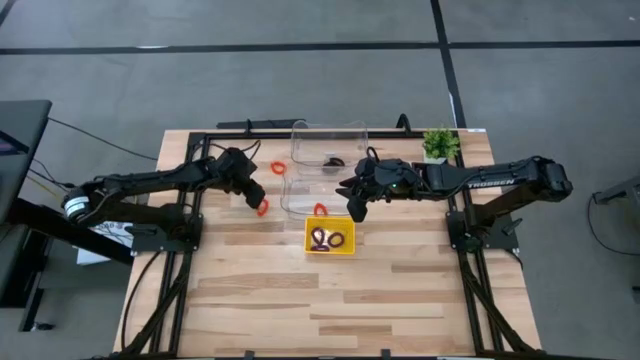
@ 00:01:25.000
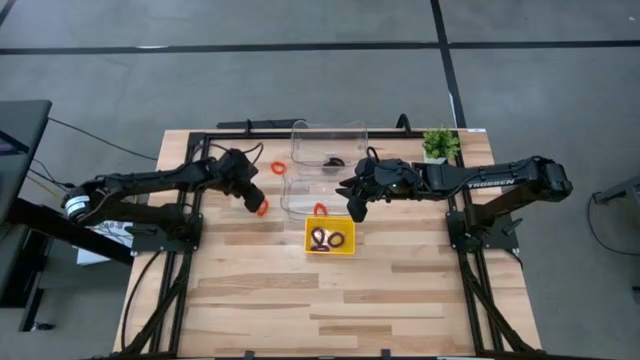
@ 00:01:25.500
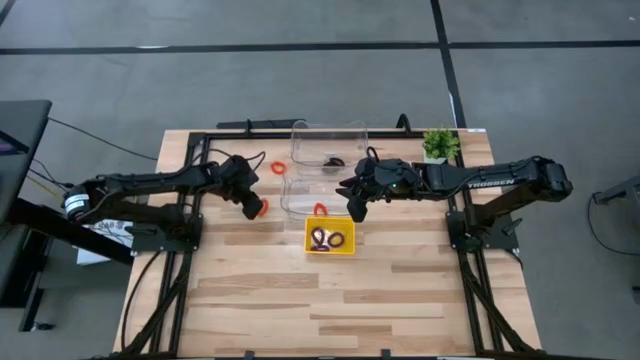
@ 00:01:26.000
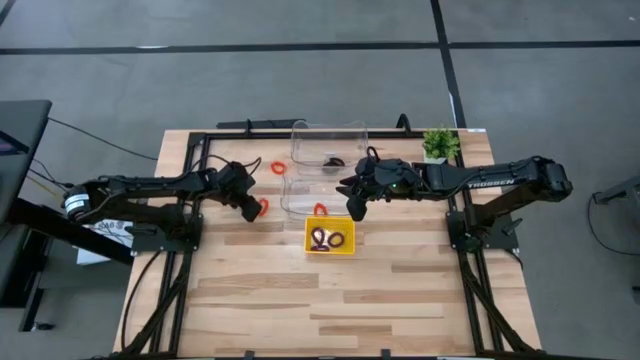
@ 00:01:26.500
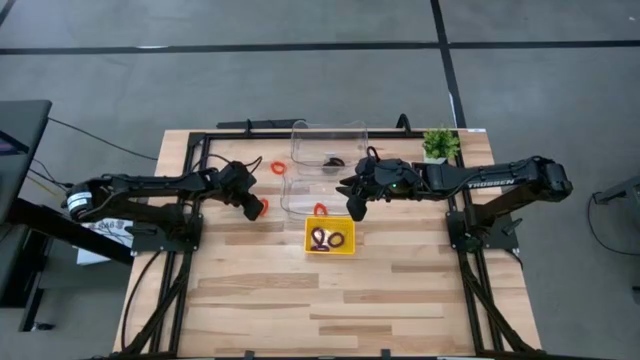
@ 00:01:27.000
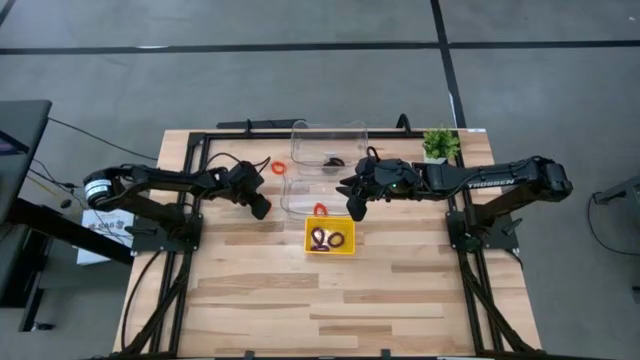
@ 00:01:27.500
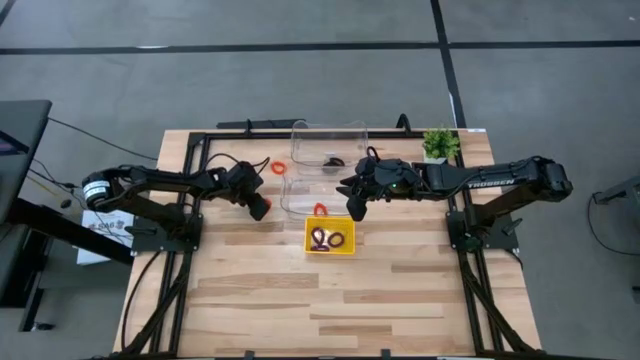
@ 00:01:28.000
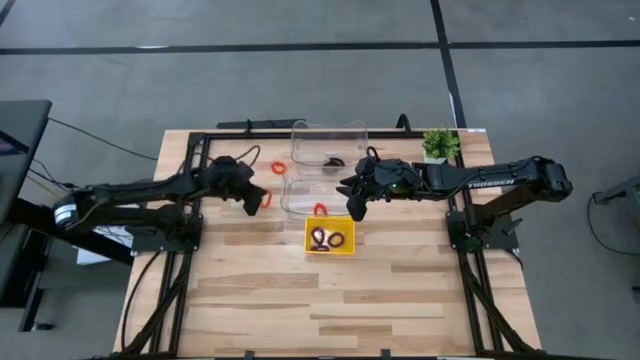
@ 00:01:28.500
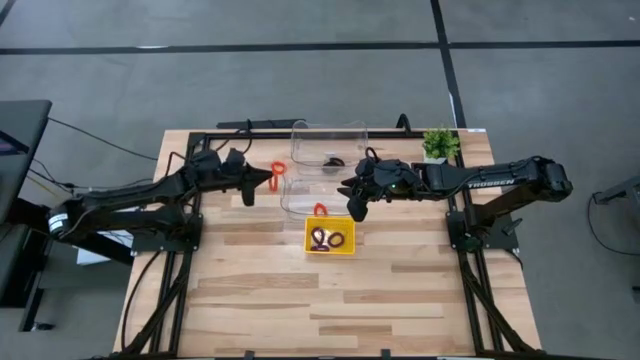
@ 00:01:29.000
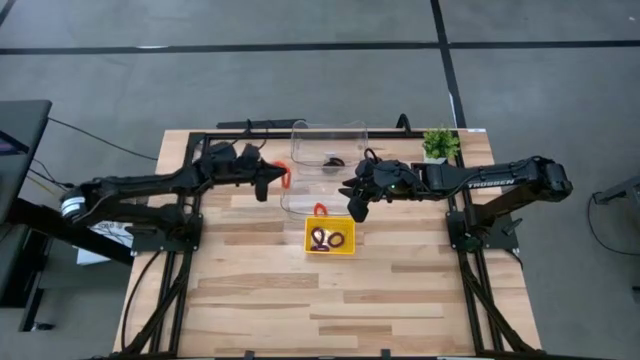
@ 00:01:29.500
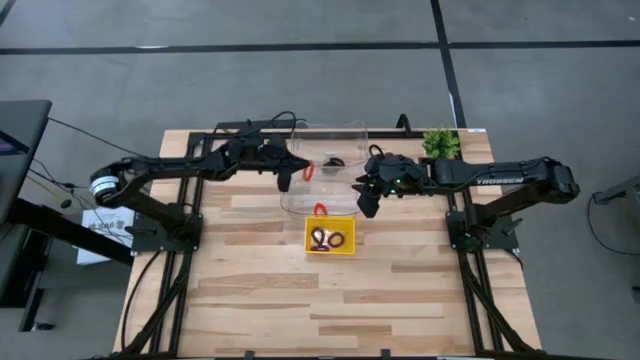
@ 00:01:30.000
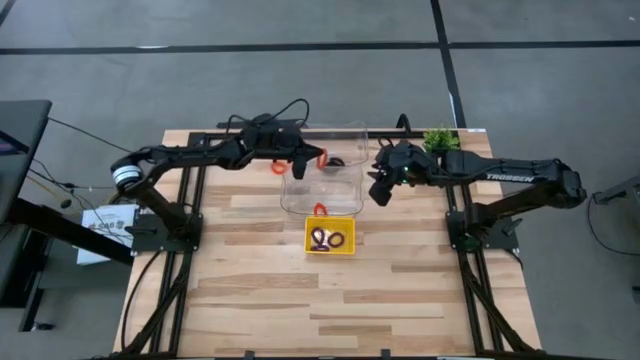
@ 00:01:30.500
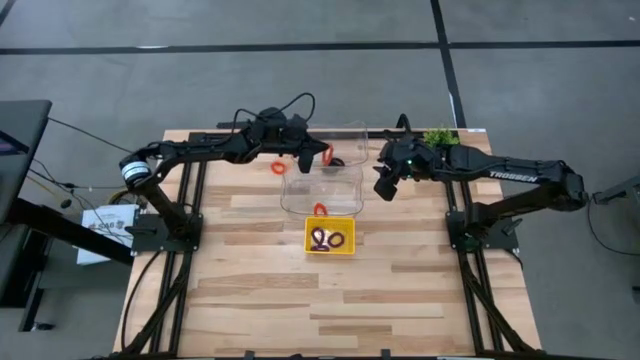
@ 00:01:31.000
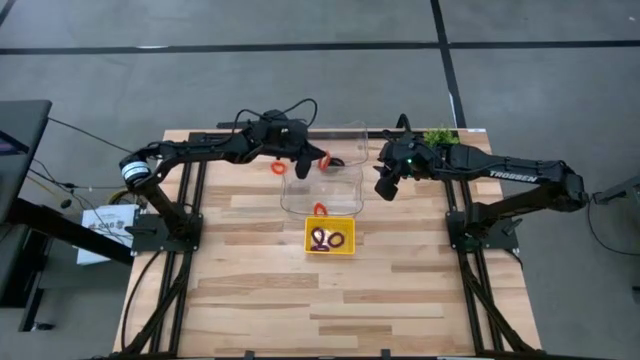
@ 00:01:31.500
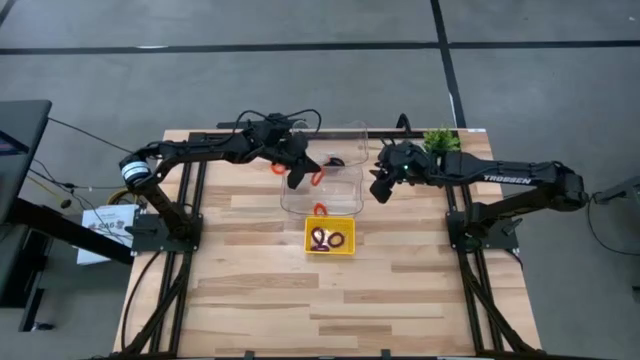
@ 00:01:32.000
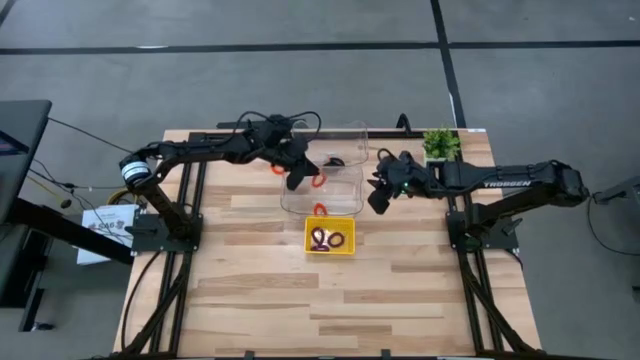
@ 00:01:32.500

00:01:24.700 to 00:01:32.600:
Task: Sort spring keychains
Put the middle left orange spring keychain into the bottom transparent bin

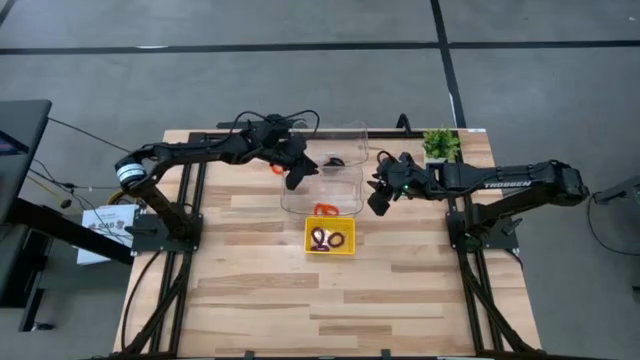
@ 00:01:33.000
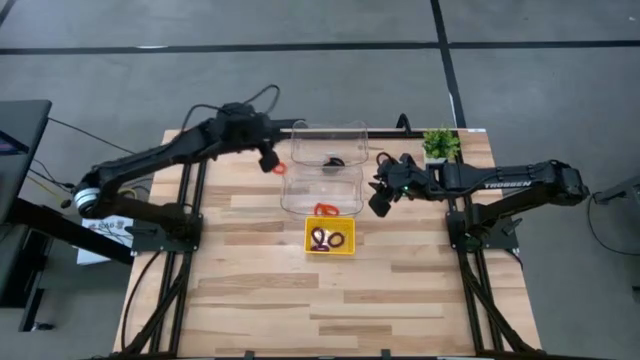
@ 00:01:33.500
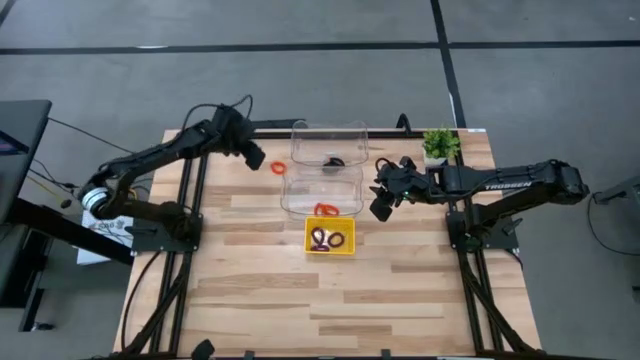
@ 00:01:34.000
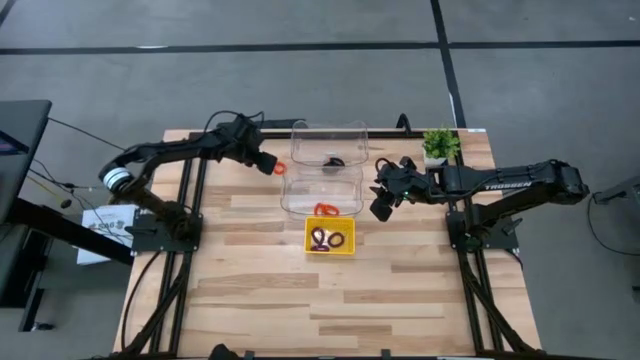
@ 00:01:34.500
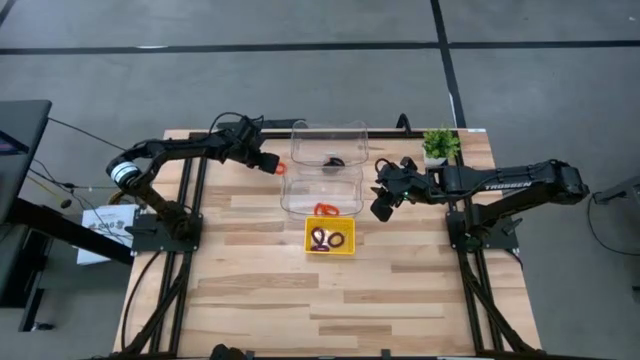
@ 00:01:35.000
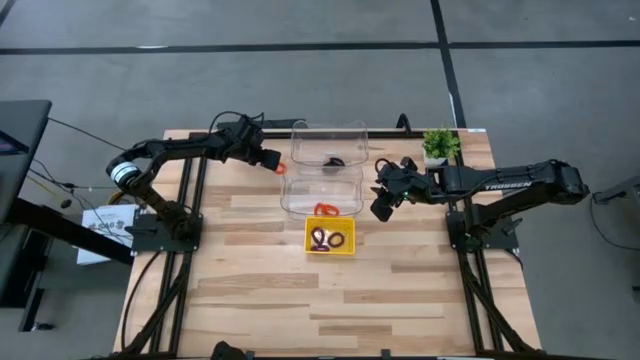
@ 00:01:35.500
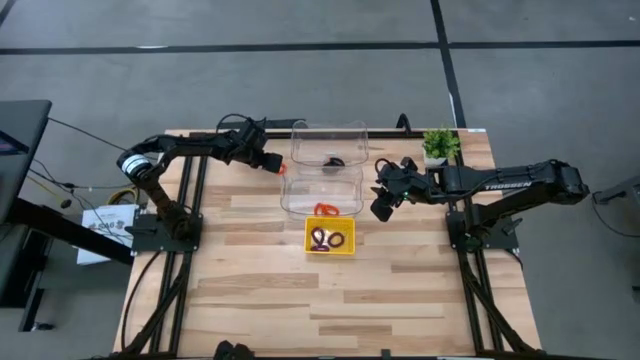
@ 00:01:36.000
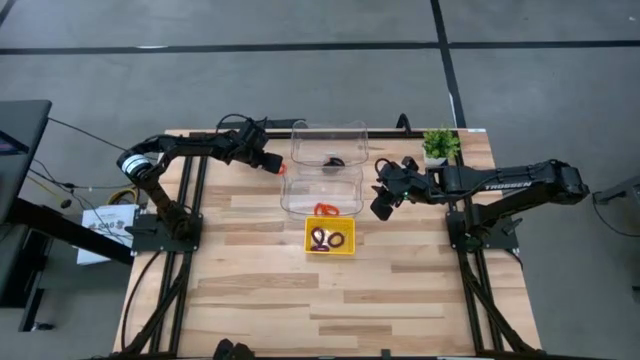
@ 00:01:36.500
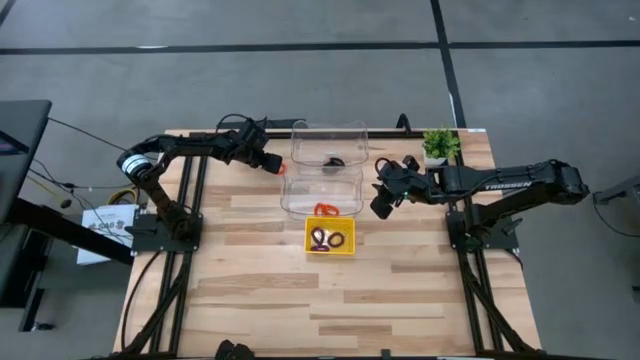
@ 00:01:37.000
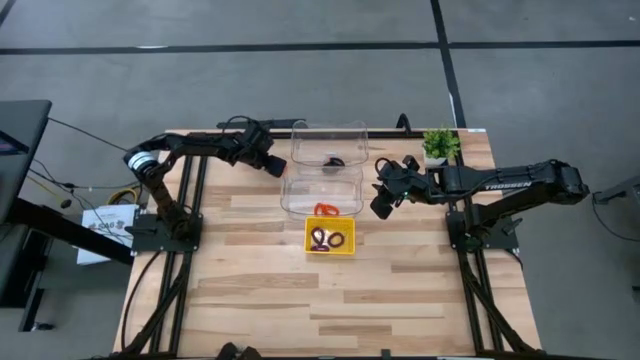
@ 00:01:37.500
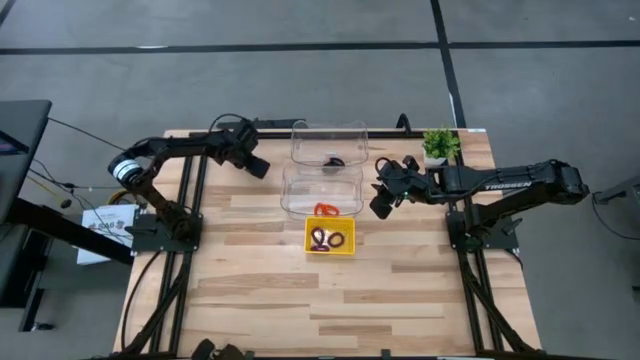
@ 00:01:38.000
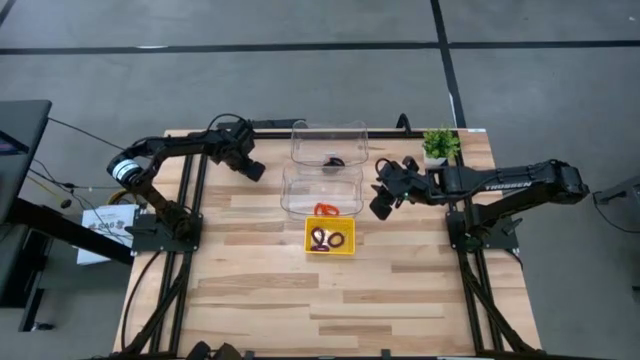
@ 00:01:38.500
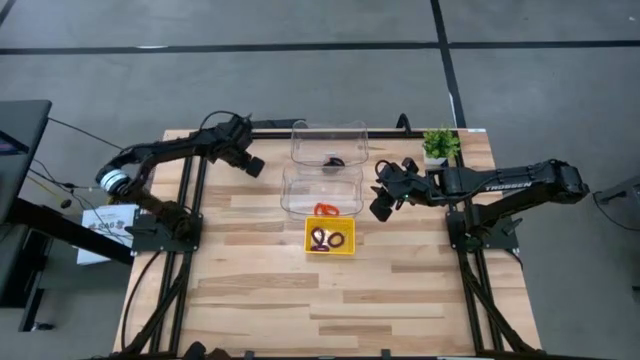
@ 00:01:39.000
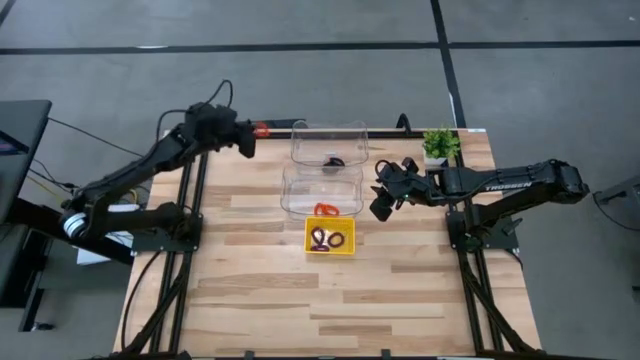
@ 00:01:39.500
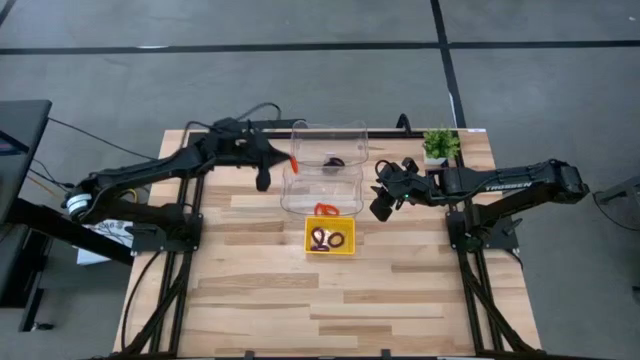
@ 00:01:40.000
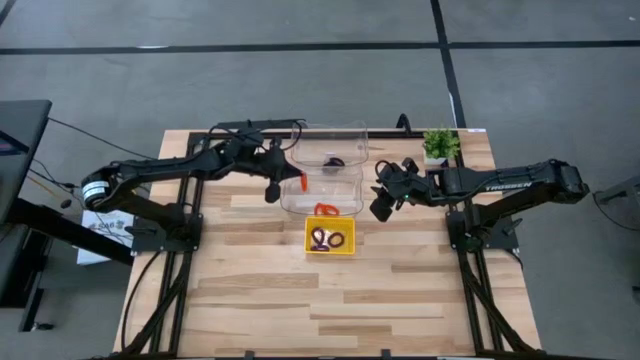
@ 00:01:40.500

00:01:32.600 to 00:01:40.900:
Put the orange spring keychain into the bottom transparent bin

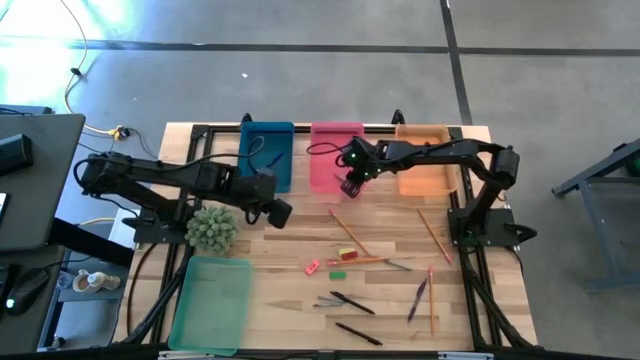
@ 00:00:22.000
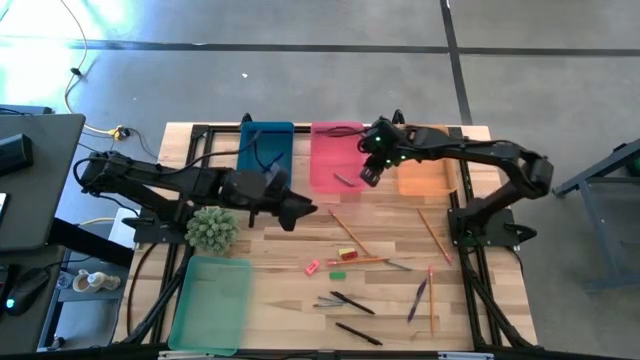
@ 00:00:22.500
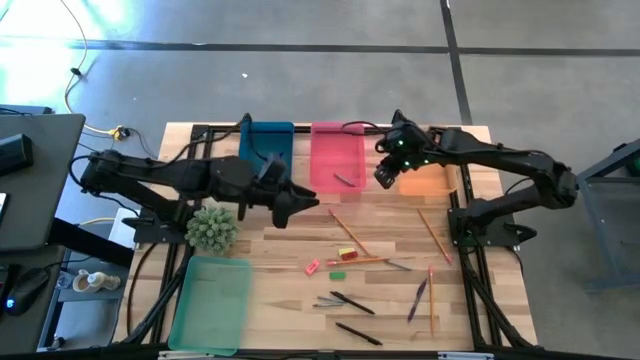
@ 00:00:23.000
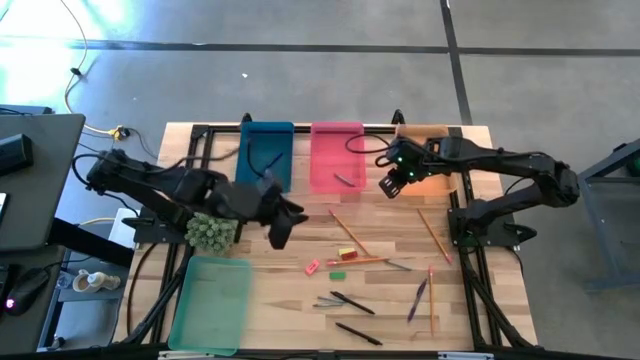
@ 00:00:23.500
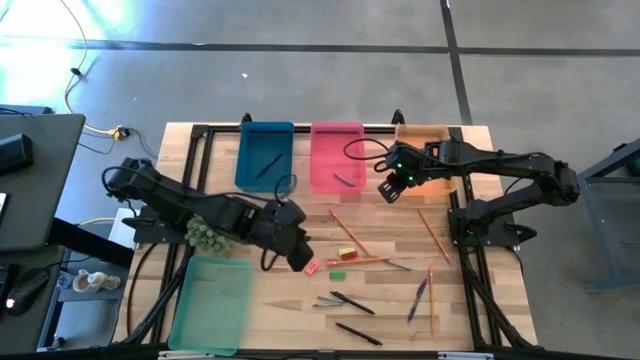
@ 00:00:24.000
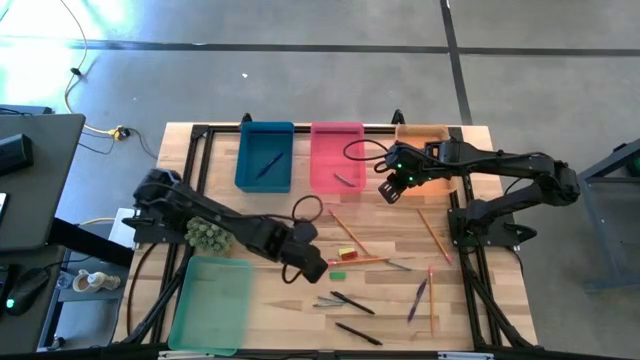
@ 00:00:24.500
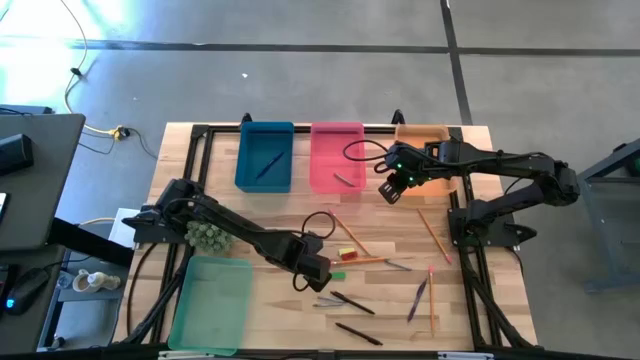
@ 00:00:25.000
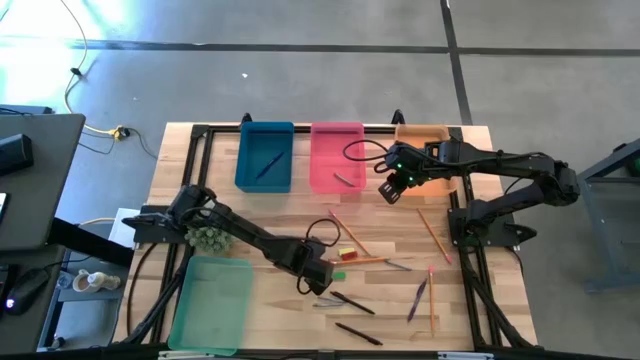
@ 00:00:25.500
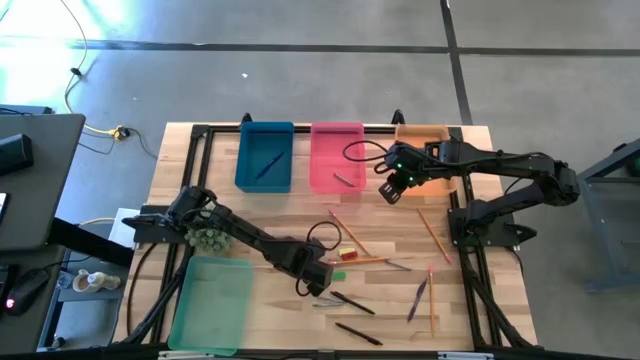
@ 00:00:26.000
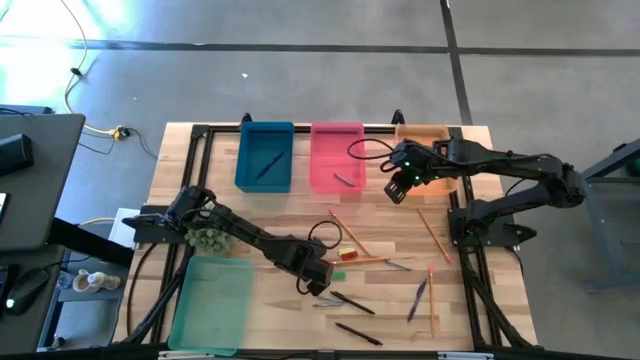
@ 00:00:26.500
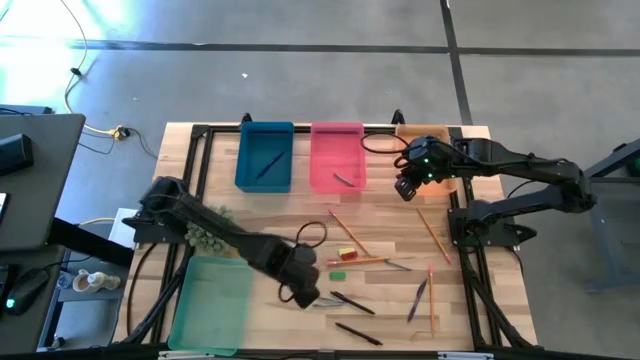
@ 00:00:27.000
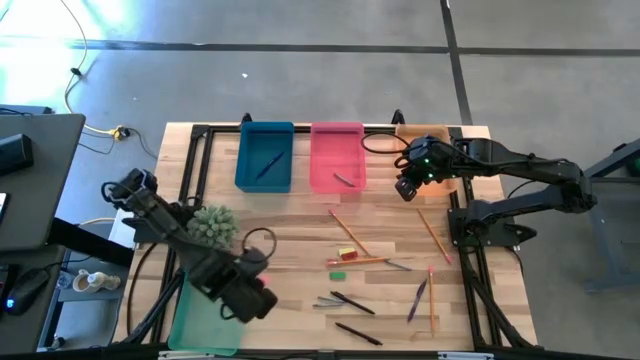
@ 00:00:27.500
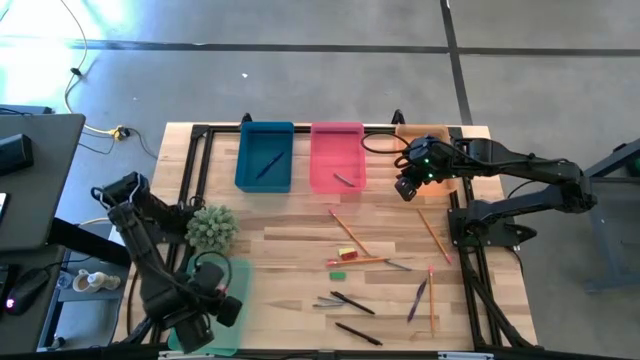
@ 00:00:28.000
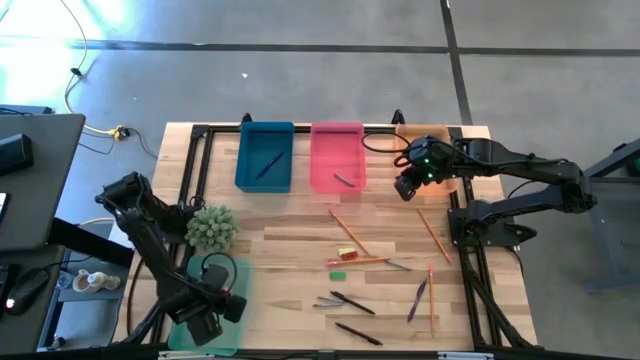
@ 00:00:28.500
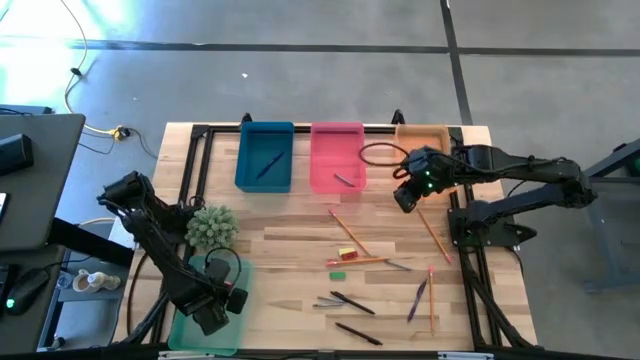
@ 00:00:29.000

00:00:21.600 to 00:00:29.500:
Task: Sort crayons/erasers/pens/pencils in bins
Put the pink eraser into the green bin
